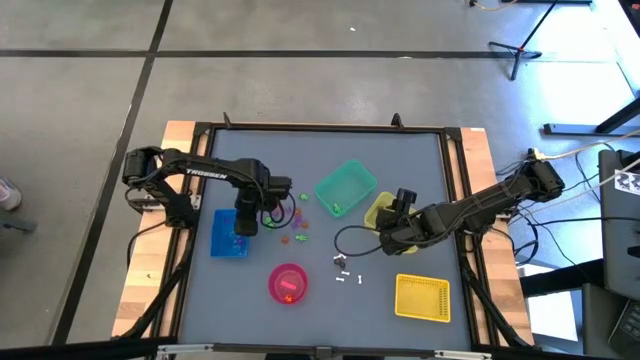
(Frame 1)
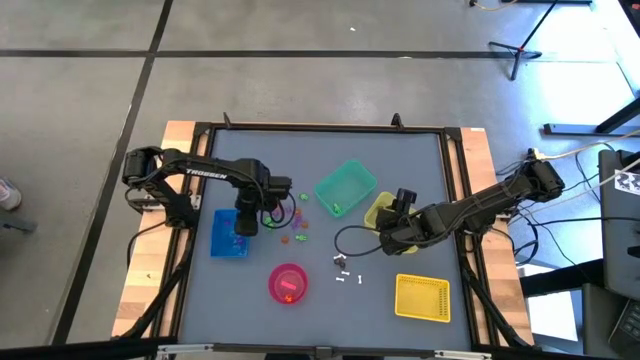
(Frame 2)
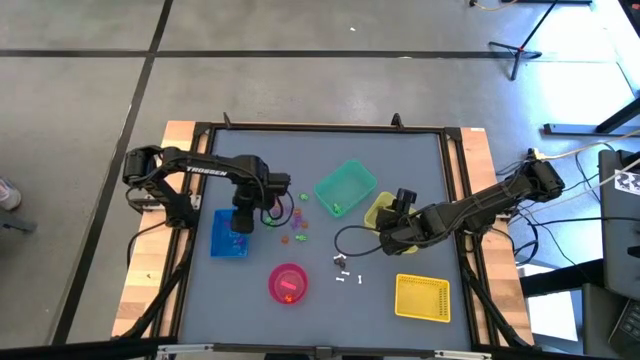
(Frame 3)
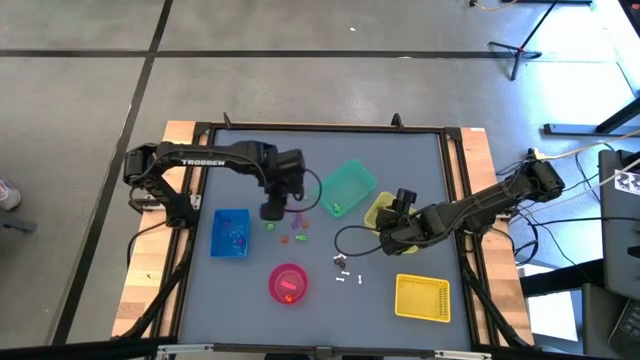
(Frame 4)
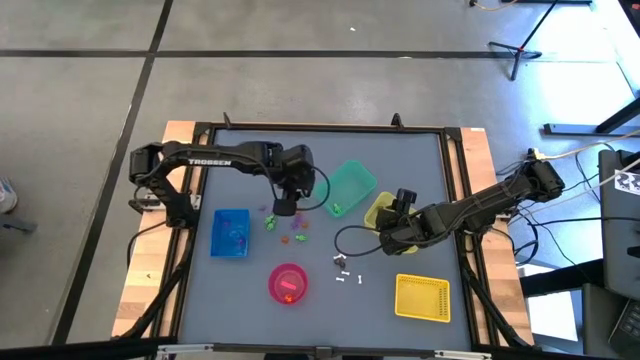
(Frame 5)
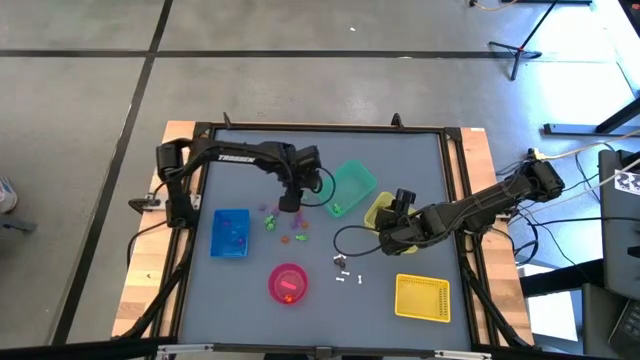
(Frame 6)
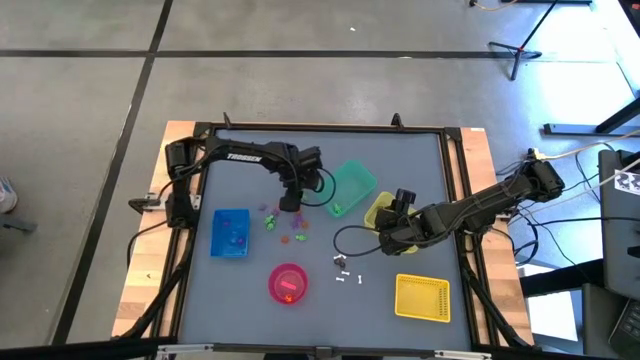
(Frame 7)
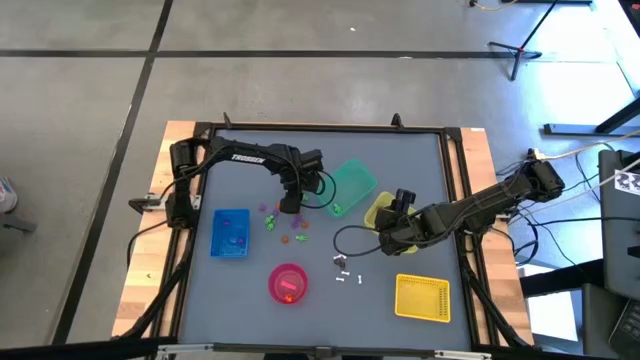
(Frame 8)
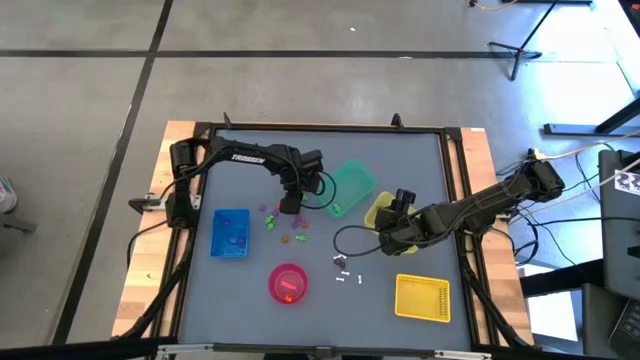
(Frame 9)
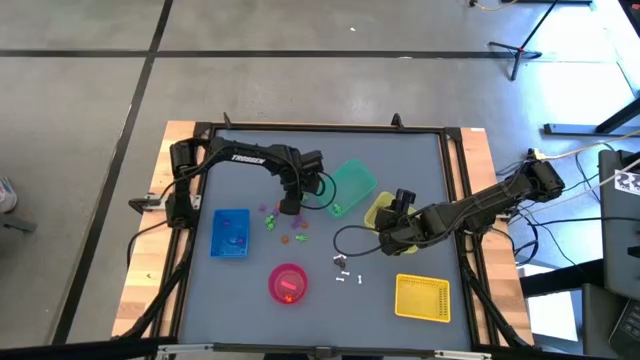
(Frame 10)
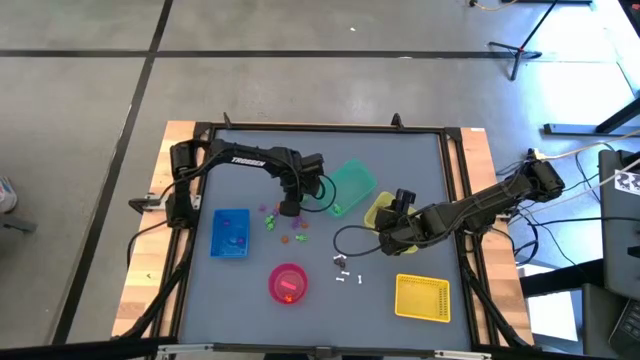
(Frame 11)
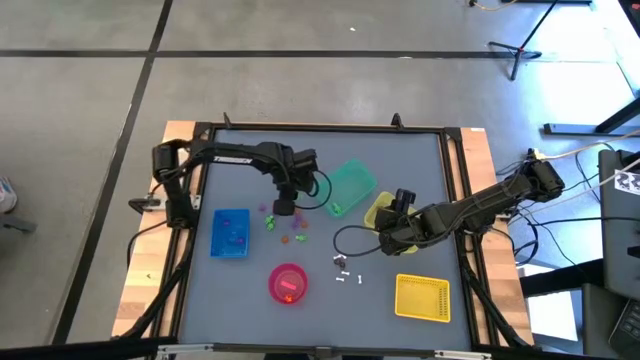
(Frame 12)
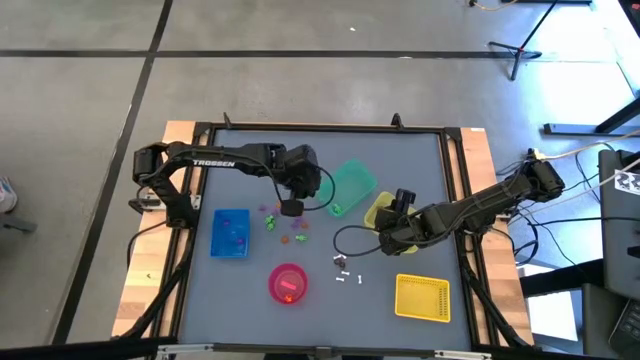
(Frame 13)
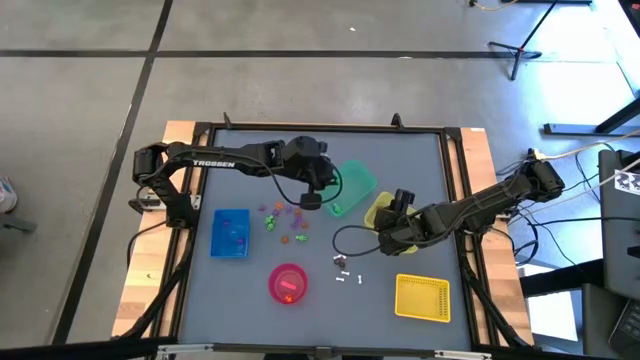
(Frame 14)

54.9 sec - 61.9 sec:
Task: Sort Halloween decoration
Put the green skeleton toy into the green bin

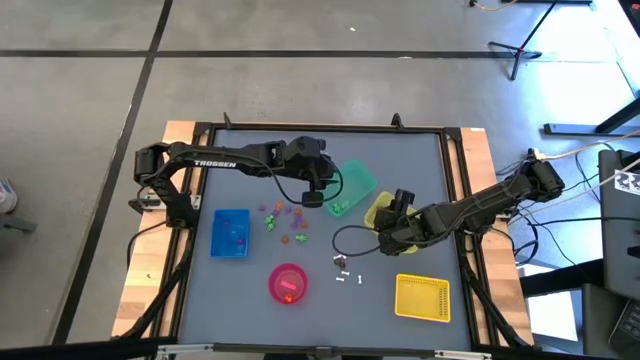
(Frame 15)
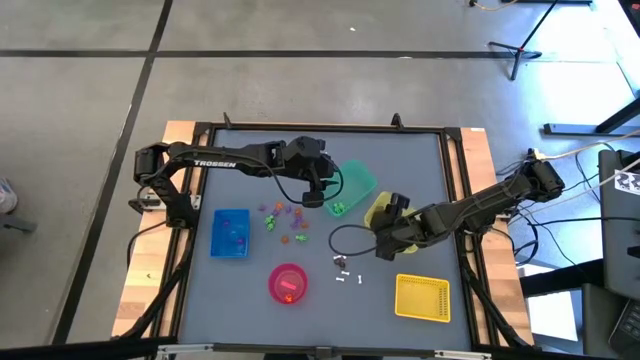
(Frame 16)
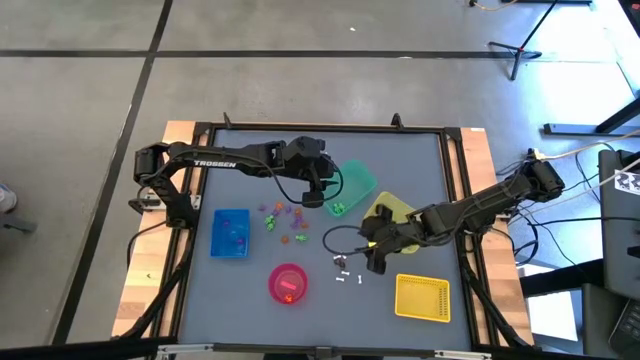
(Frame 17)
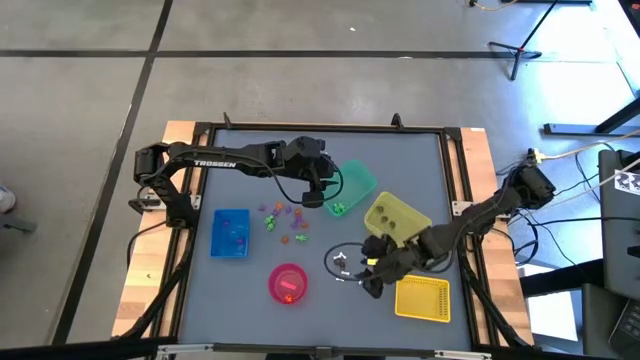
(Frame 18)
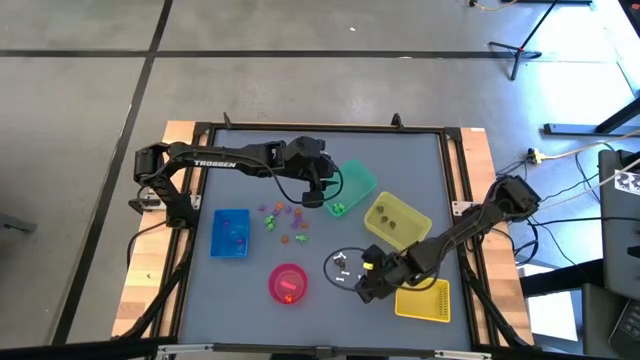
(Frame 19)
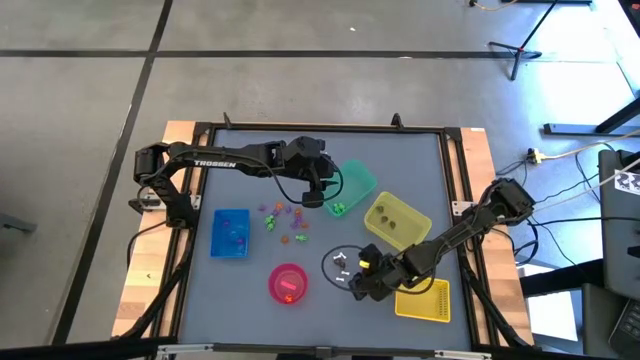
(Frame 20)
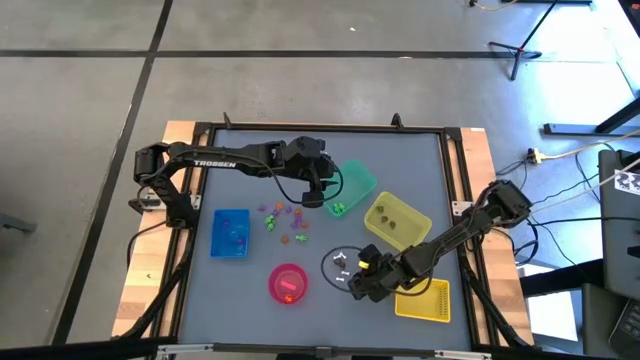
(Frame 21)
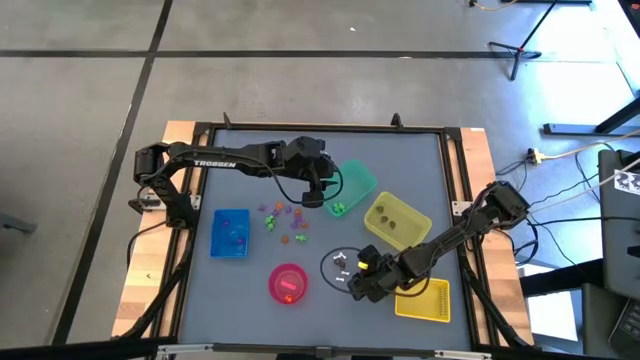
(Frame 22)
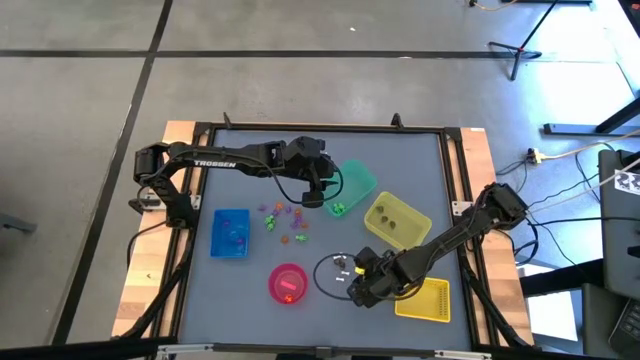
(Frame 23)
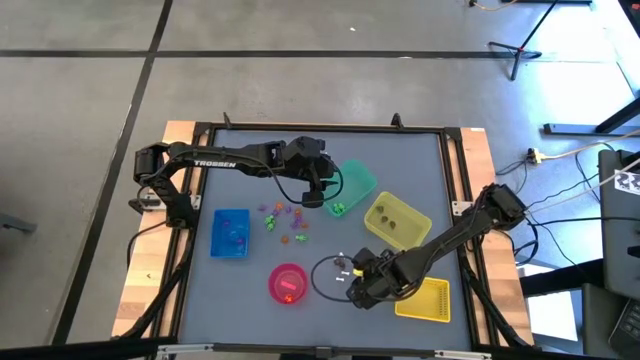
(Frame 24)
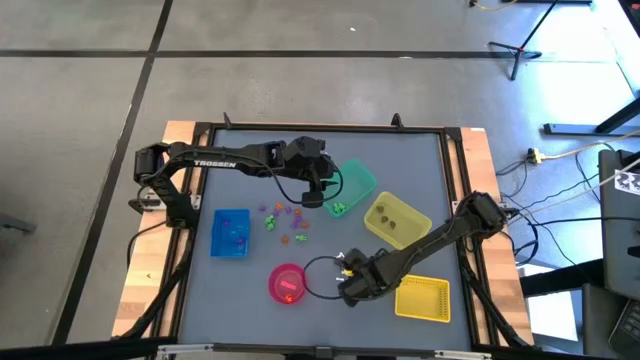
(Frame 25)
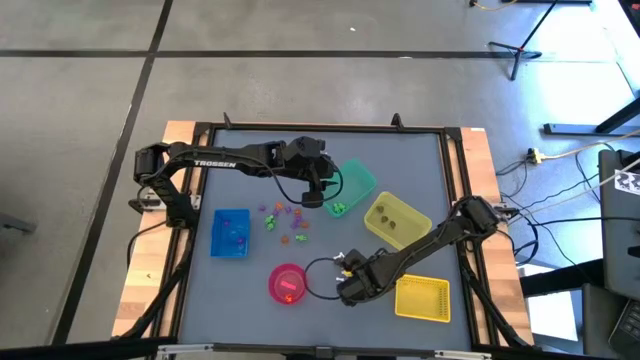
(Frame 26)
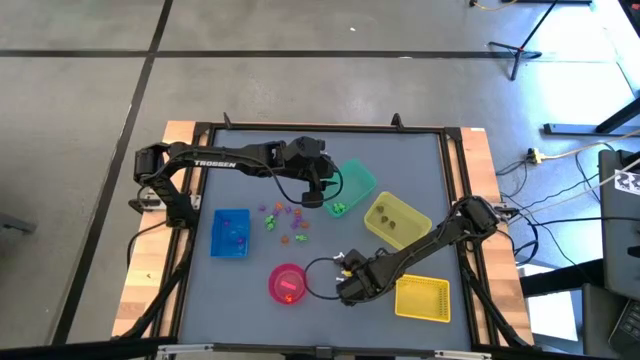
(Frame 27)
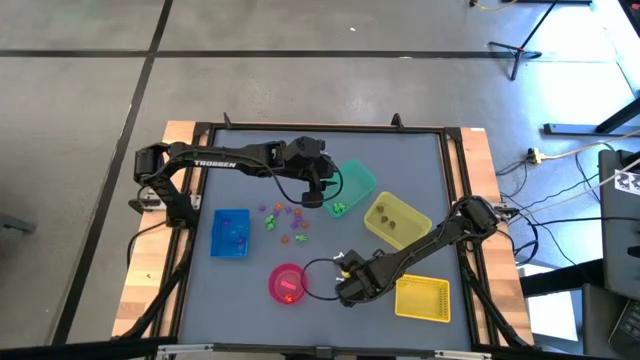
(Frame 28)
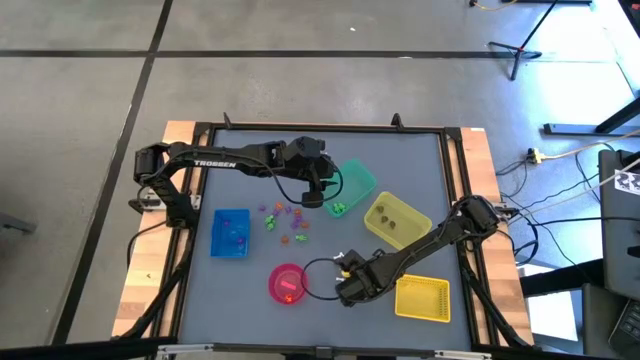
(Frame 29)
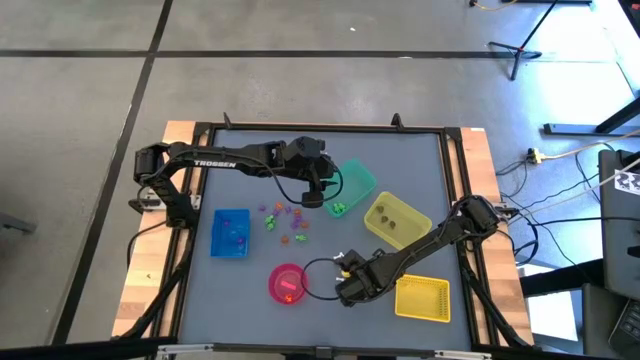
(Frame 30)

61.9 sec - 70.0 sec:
Put the white bone toy into the yellow bin

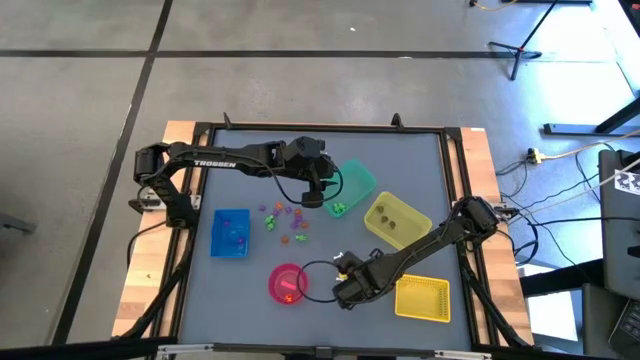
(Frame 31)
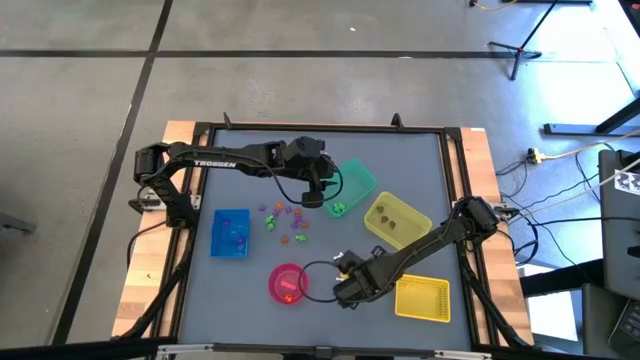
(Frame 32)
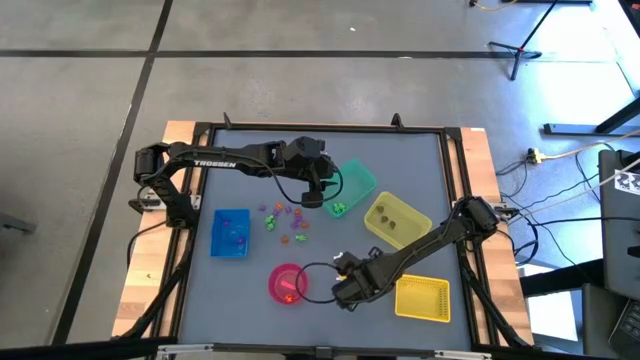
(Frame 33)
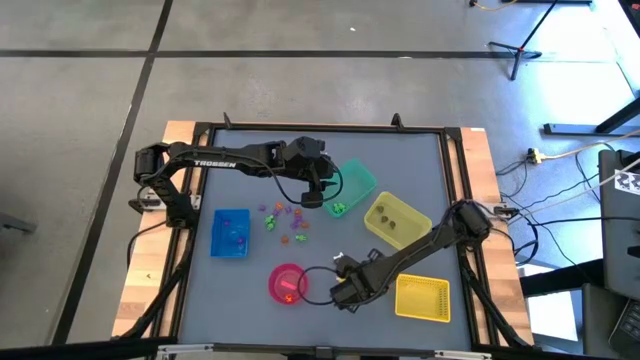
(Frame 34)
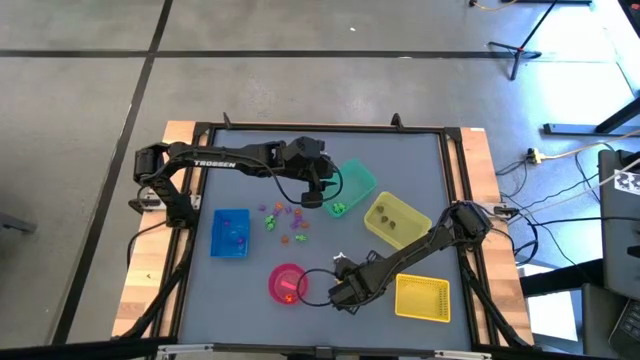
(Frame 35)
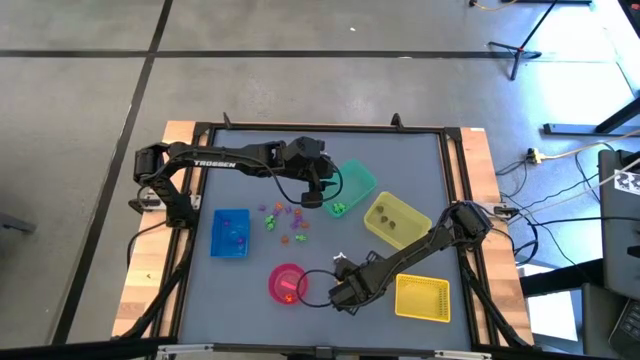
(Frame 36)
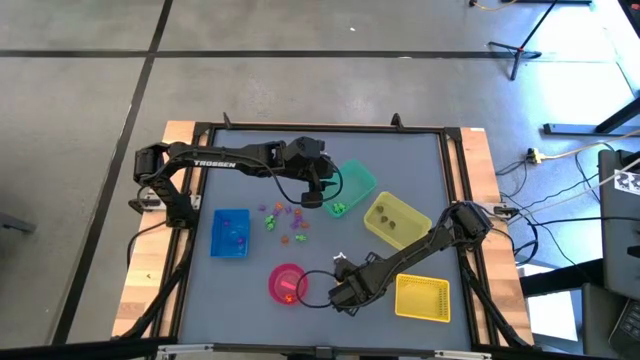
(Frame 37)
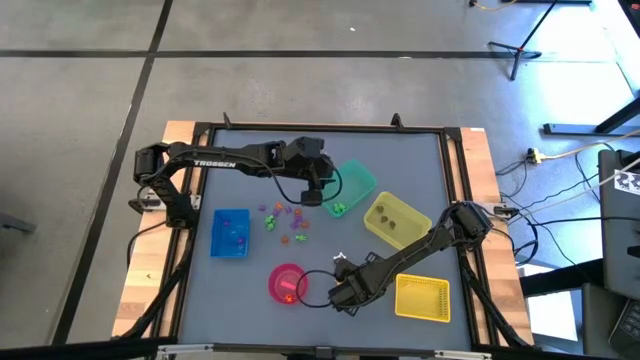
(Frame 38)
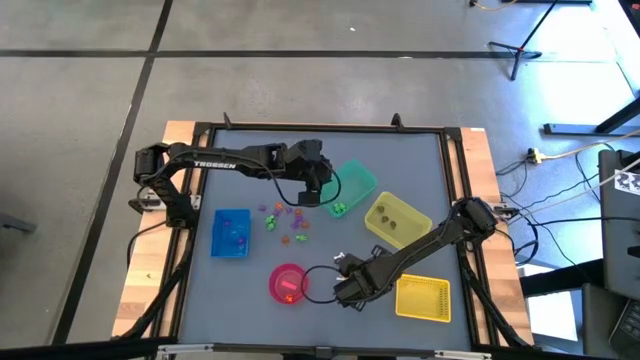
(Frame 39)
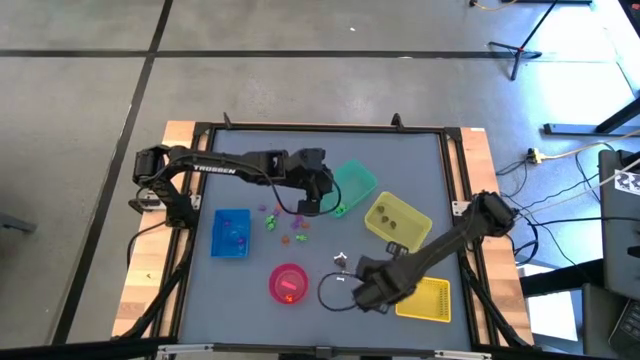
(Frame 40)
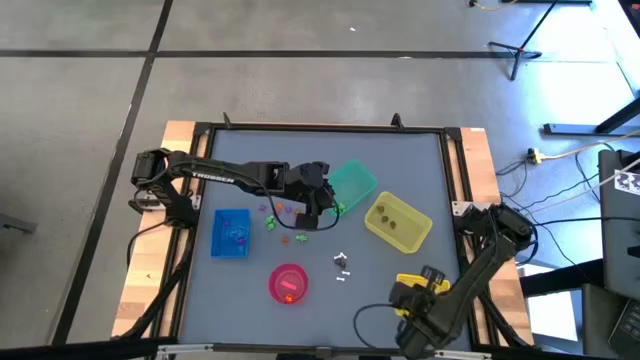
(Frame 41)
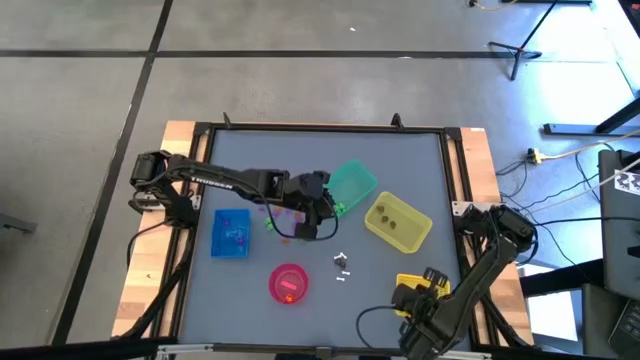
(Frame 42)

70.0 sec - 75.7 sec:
Put the white bone toy into the yellow bin
